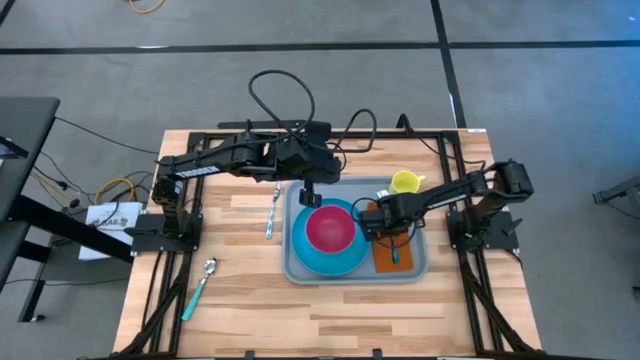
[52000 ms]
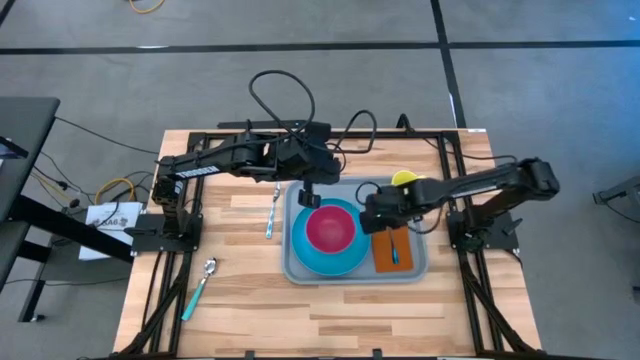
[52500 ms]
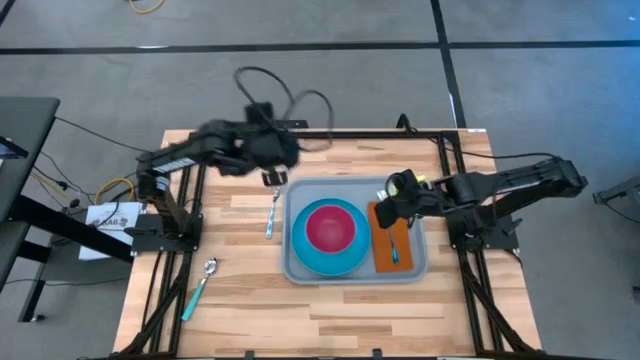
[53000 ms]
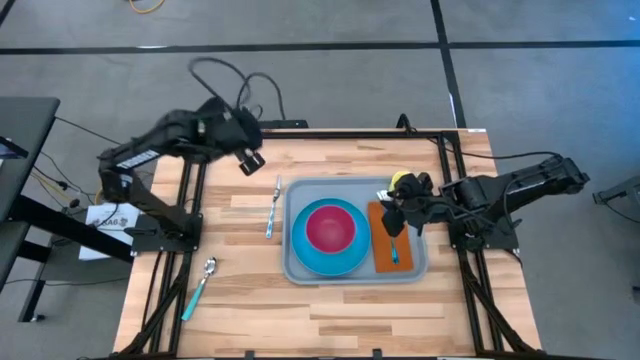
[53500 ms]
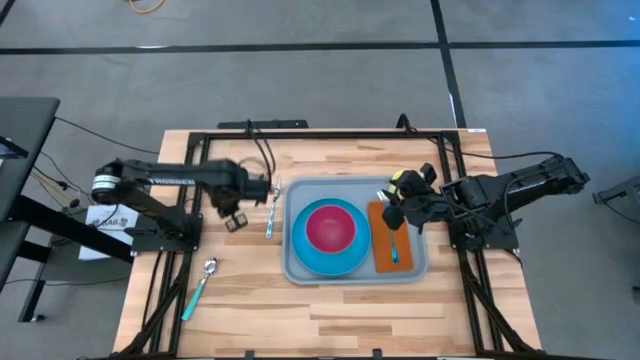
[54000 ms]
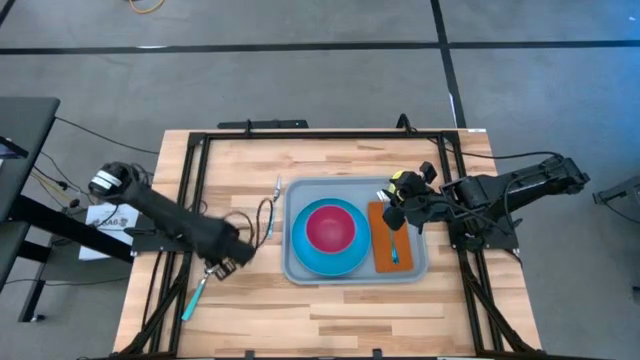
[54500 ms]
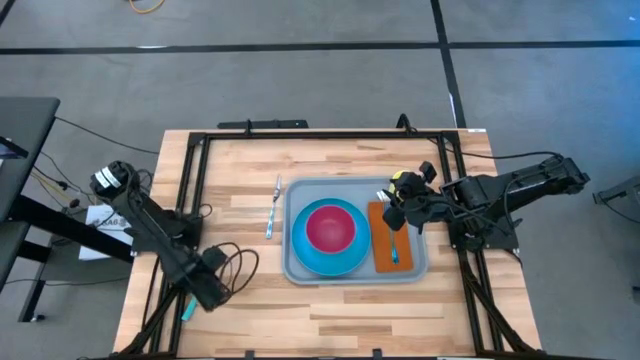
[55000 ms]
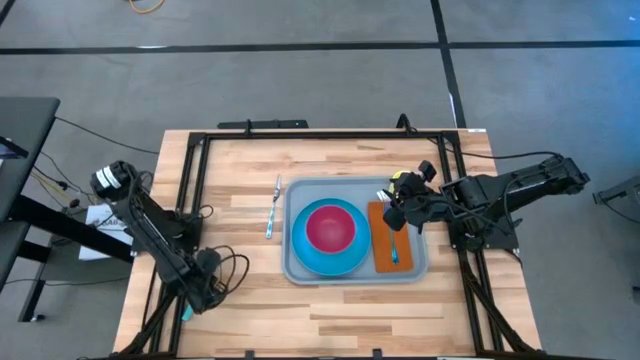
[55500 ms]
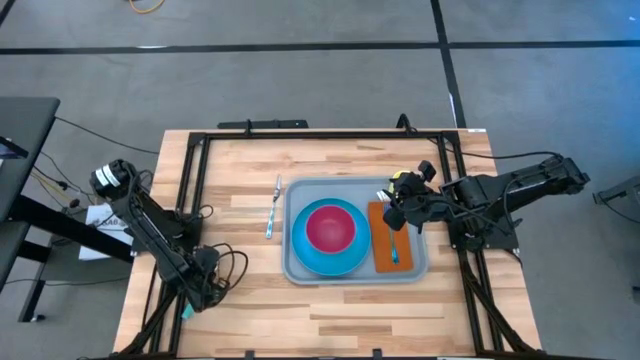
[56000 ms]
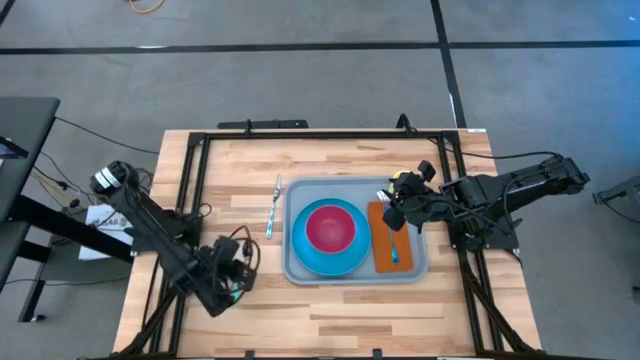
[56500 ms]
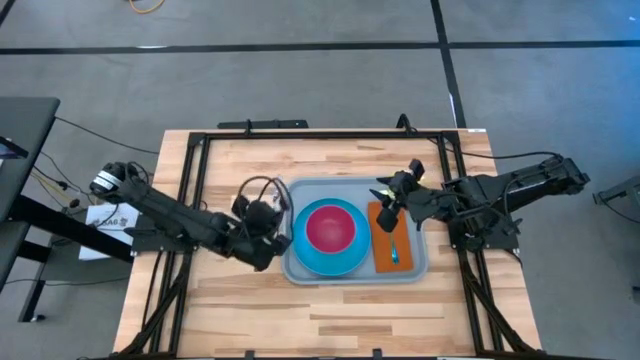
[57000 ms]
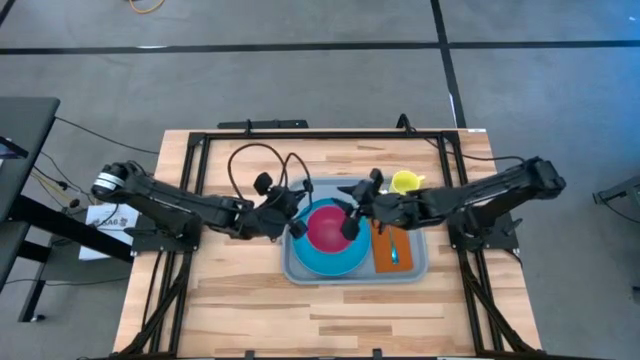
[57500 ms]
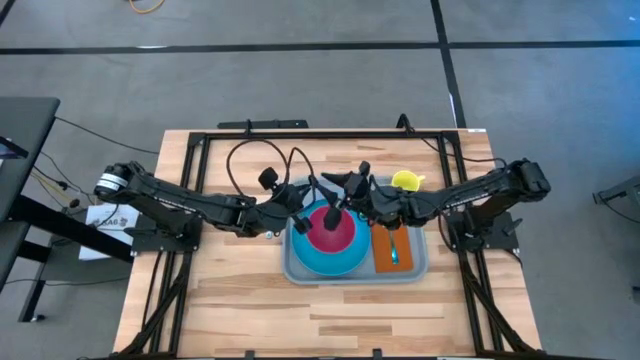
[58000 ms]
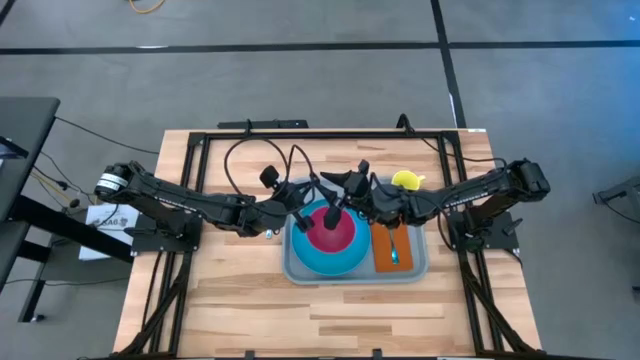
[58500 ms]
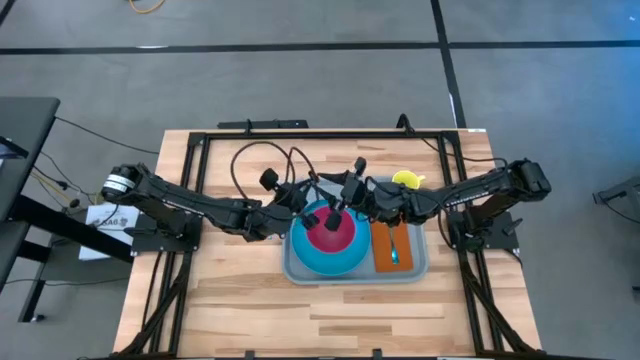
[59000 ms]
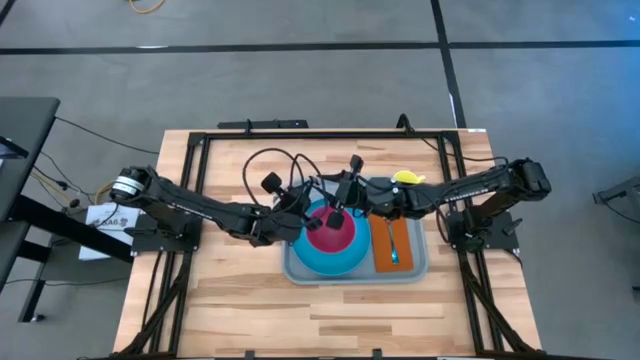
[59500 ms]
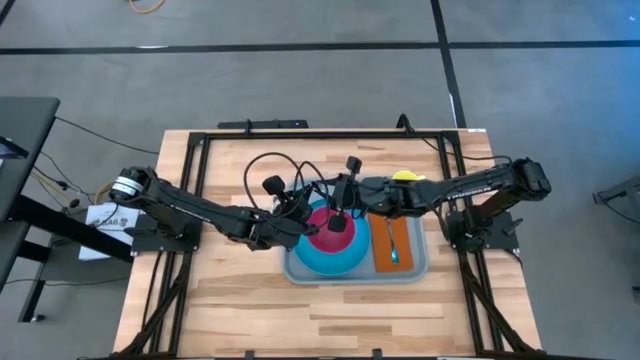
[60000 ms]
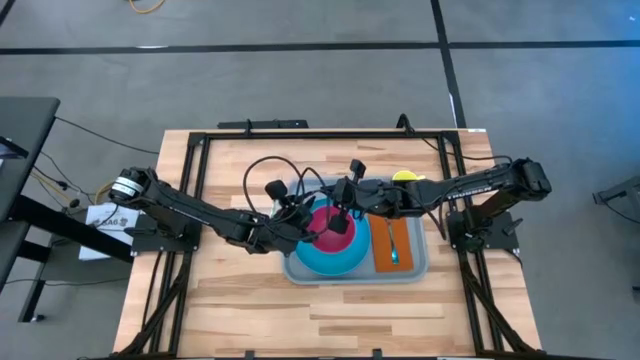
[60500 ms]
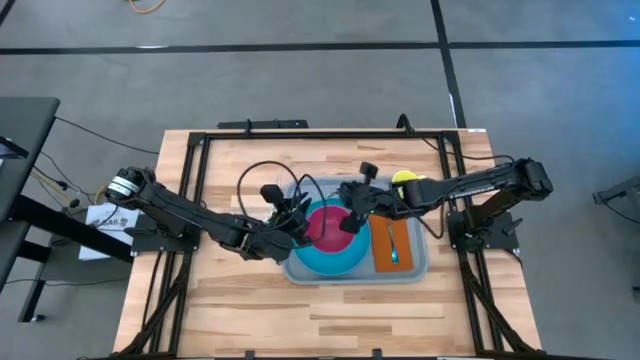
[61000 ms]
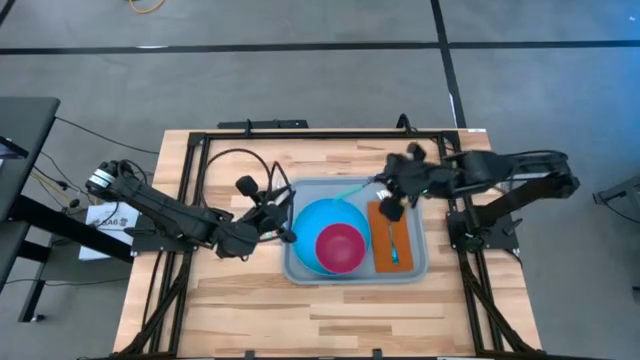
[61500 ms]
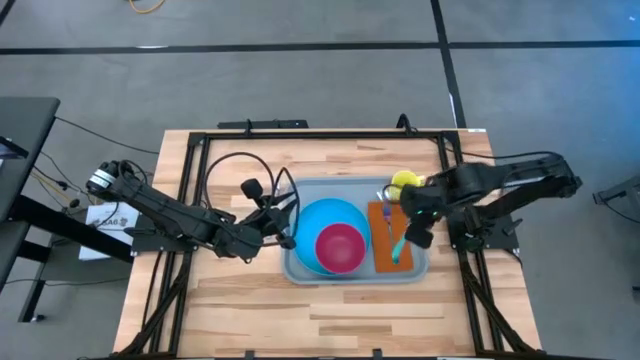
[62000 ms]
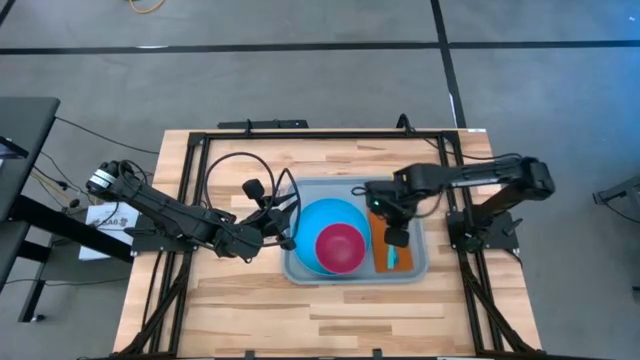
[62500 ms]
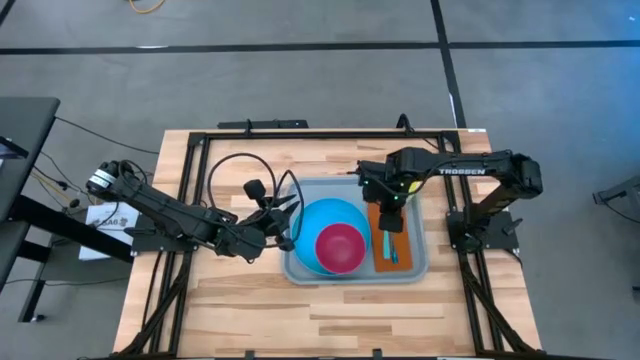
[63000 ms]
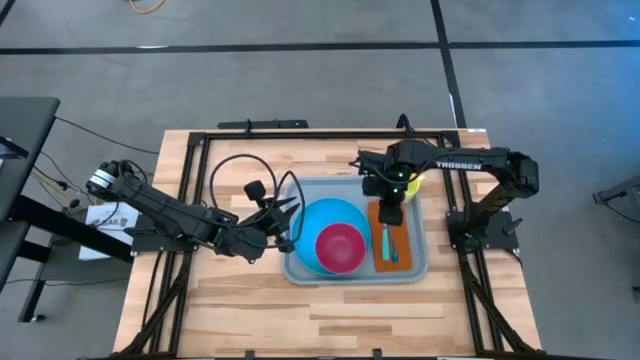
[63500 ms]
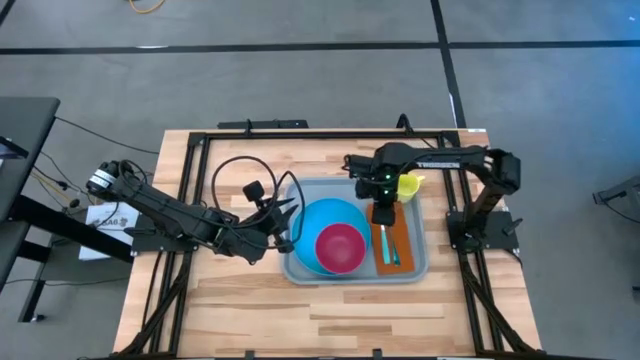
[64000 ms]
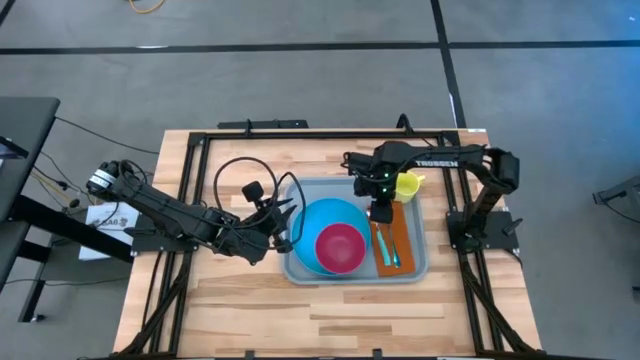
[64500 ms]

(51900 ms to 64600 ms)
Task: Set up tray
Put the blue spoon on the brown napkin to the left of the purple fork

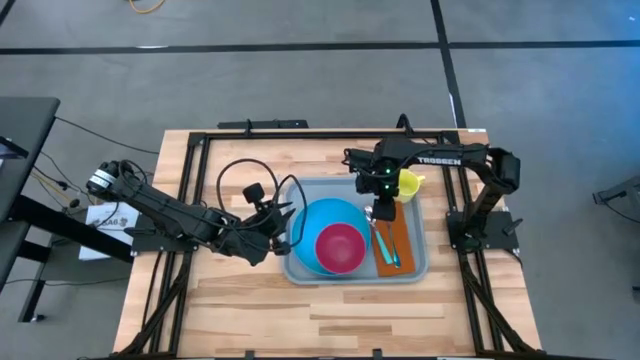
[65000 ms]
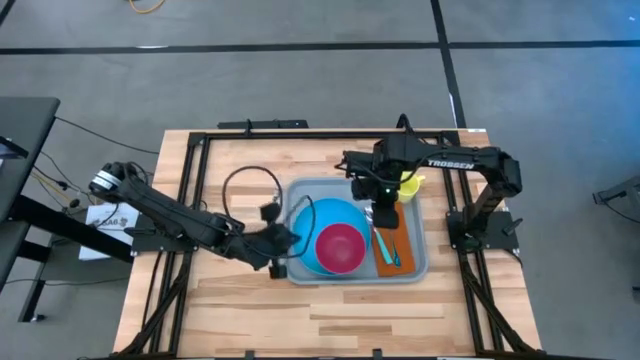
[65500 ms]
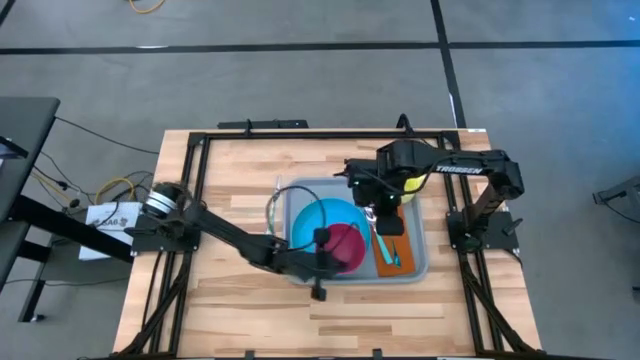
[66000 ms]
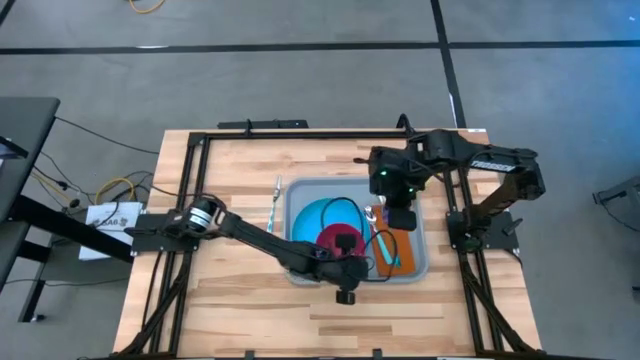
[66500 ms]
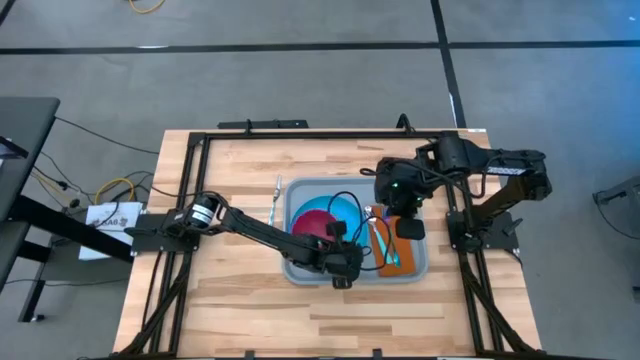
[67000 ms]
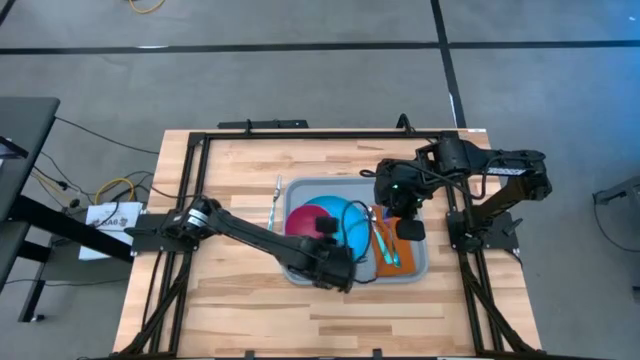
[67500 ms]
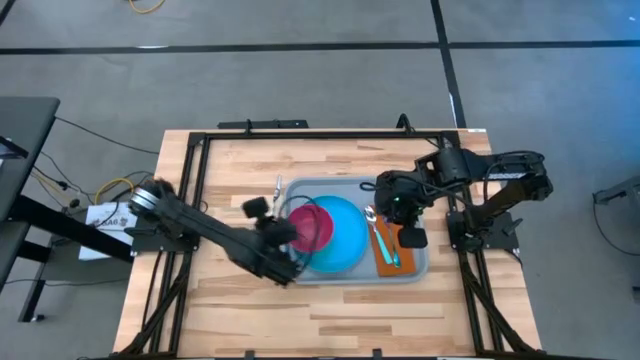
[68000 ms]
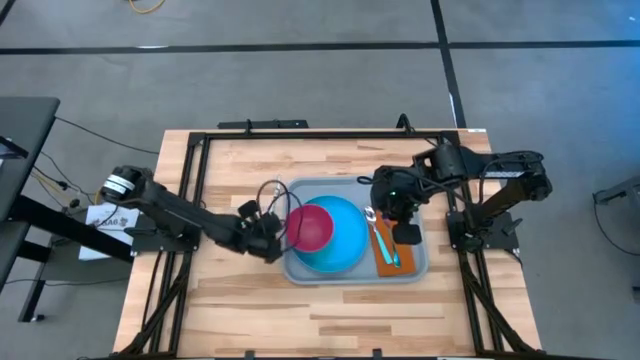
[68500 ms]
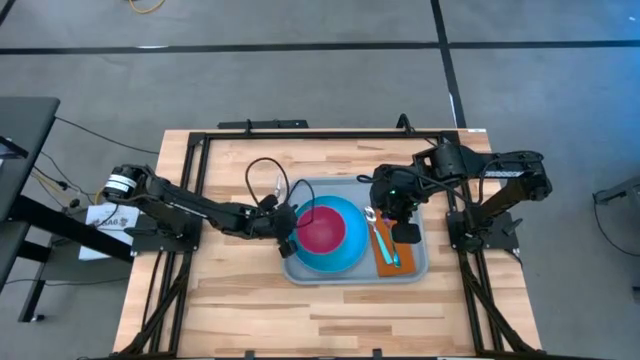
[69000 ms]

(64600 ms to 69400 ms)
Adjust the red bowl on the blue plate

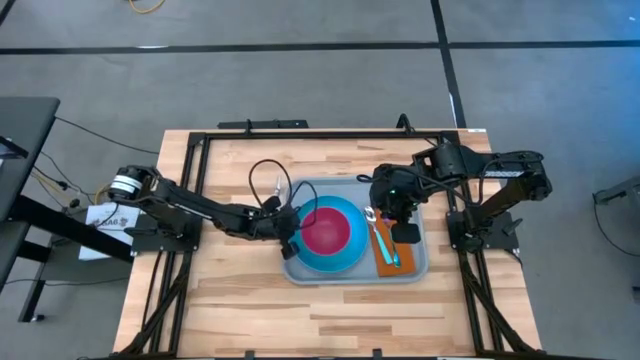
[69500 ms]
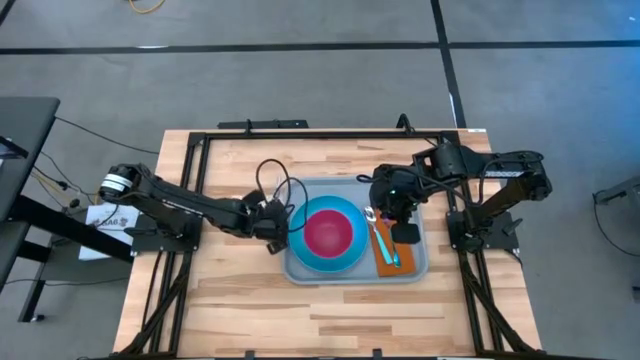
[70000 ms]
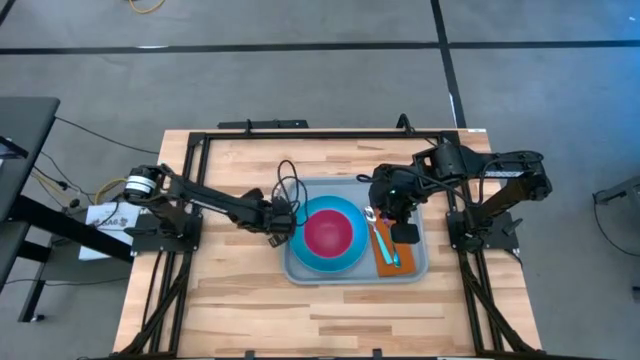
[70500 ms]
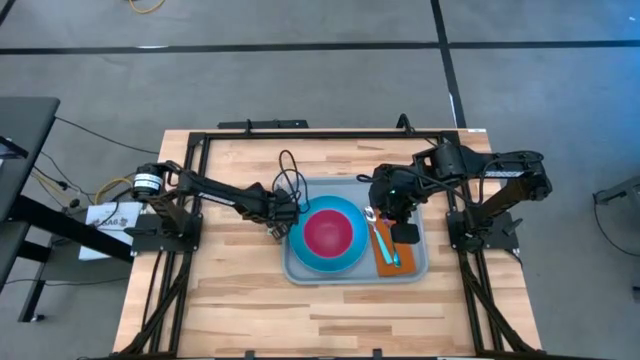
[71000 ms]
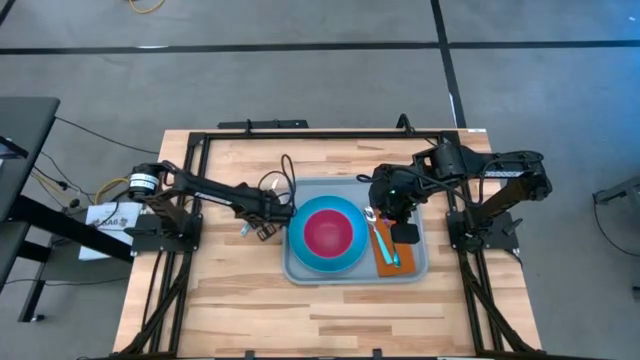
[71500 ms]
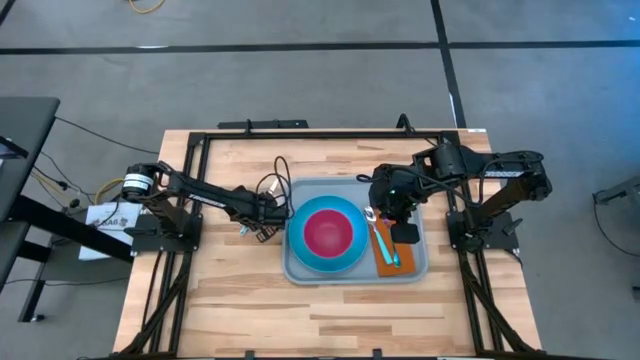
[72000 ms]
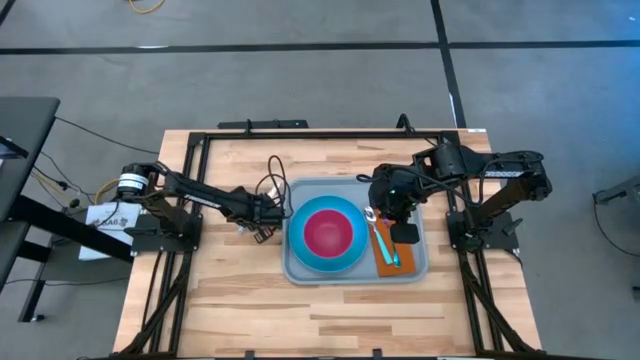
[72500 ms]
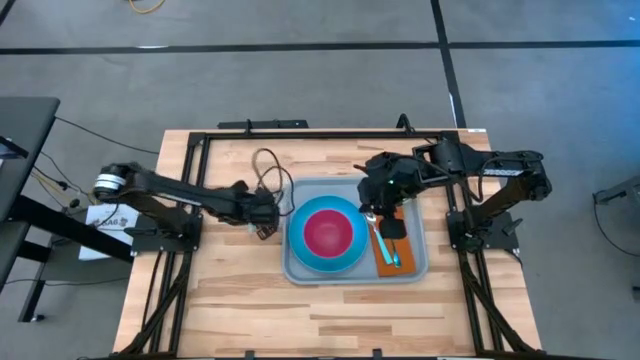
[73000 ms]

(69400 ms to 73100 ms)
Put the blue patterned knife on the brown napkin to the right of the purple fork
